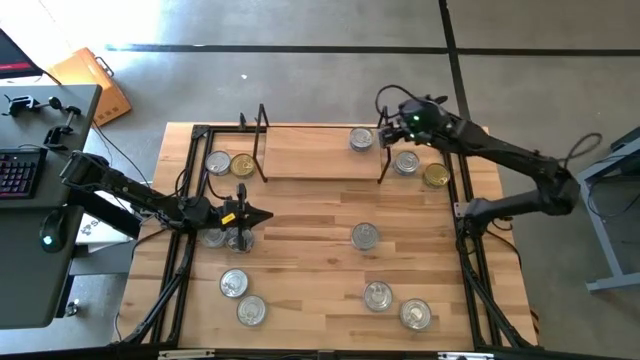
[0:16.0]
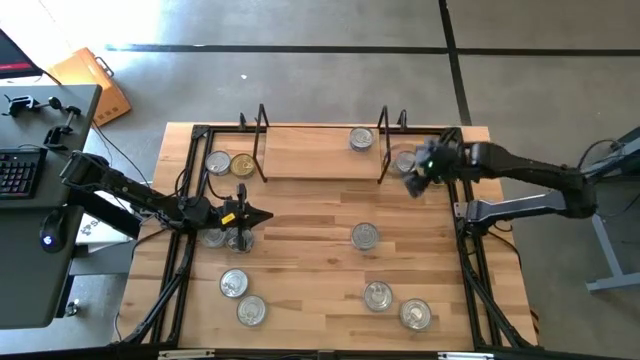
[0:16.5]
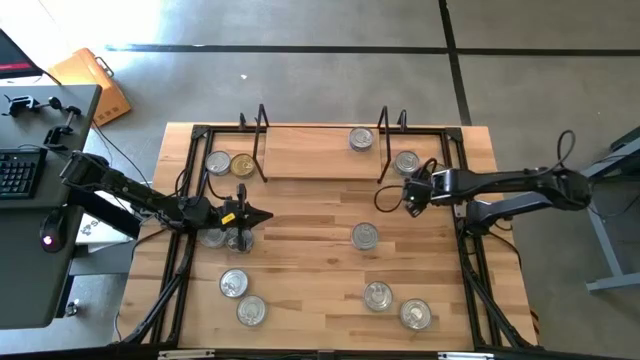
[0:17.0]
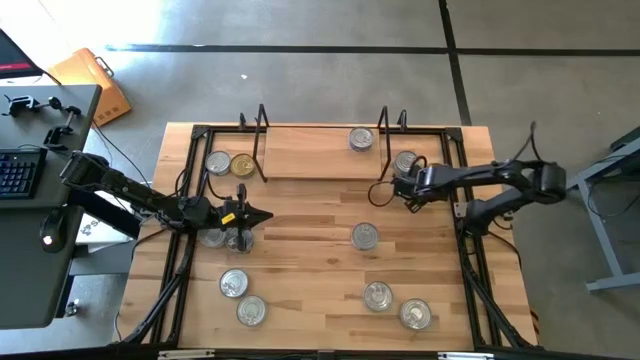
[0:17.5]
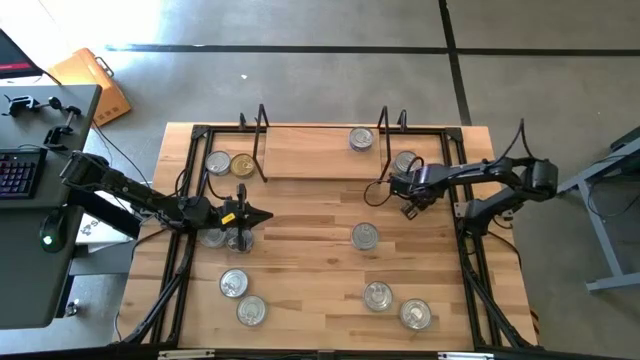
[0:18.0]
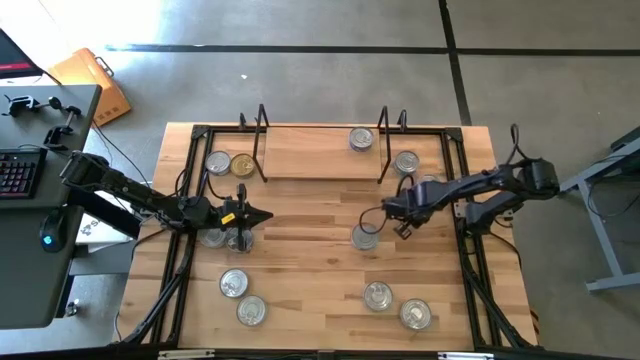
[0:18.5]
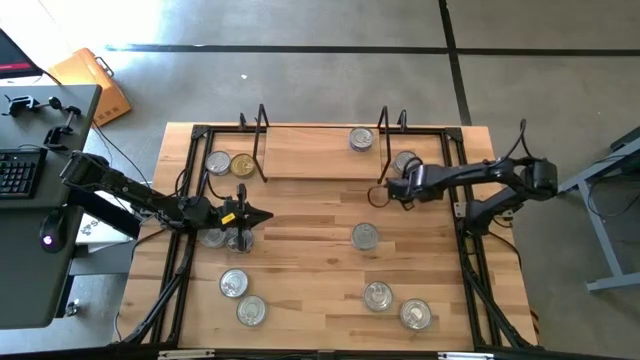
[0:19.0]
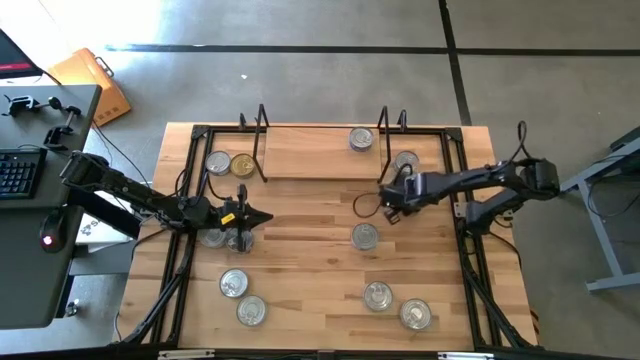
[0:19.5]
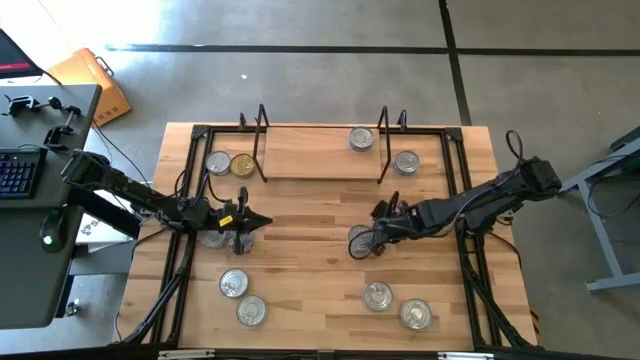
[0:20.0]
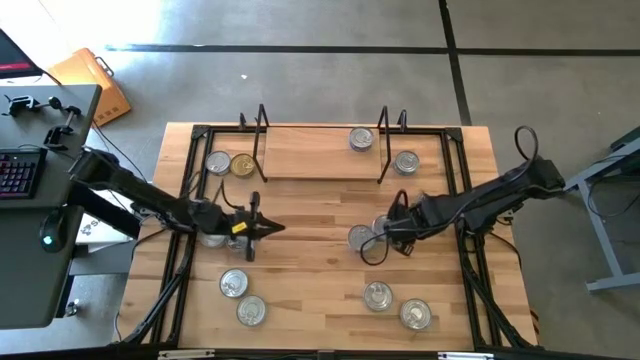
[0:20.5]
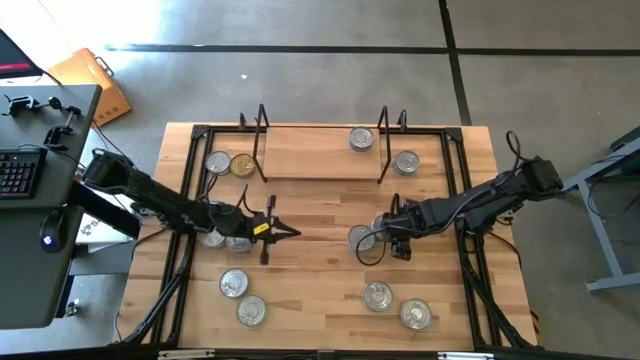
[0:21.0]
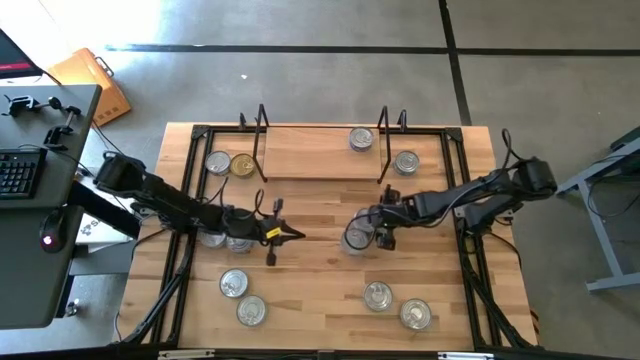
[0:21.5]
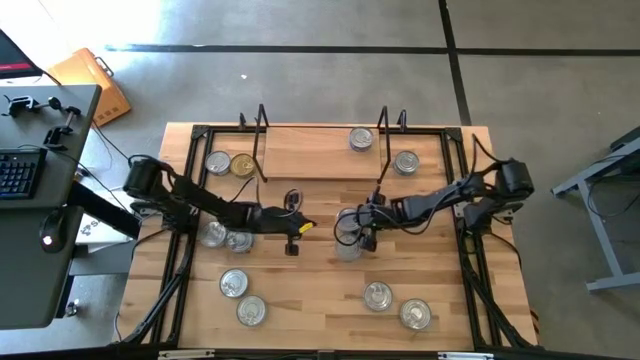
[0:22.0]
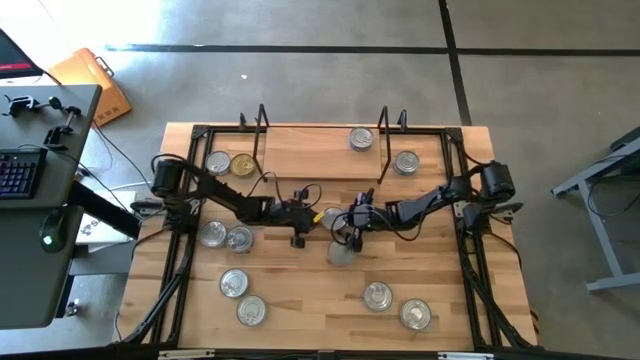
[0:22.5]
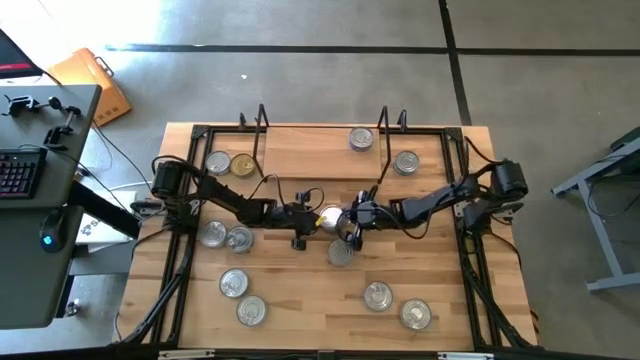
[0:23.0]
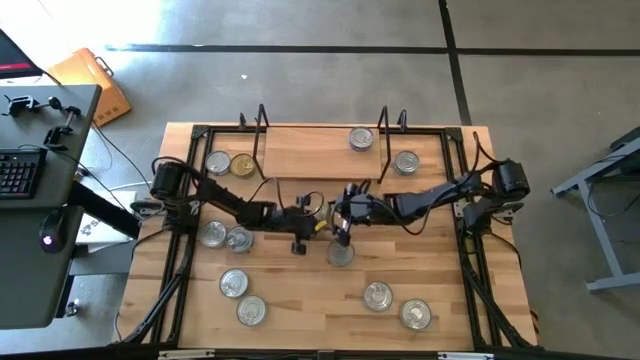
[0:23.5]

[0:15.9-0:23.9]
Task: Stack canned seafood by type on shelf
Put the green tuna can on the shelf

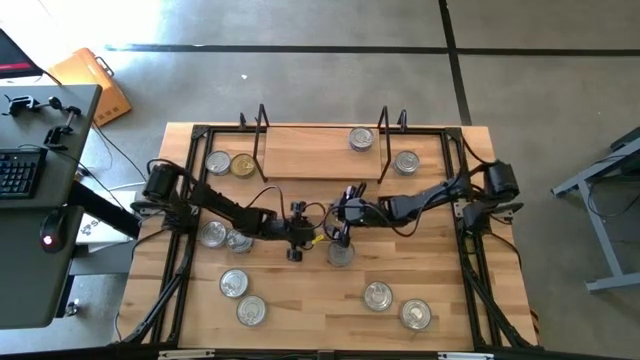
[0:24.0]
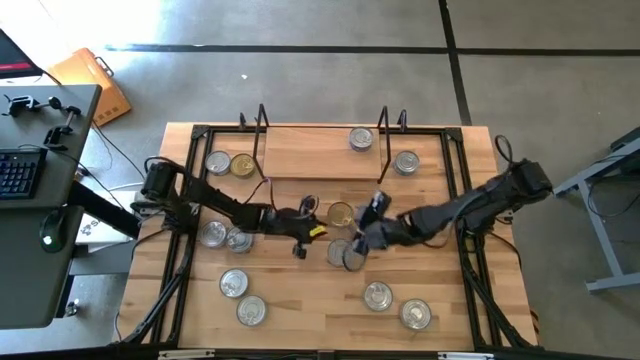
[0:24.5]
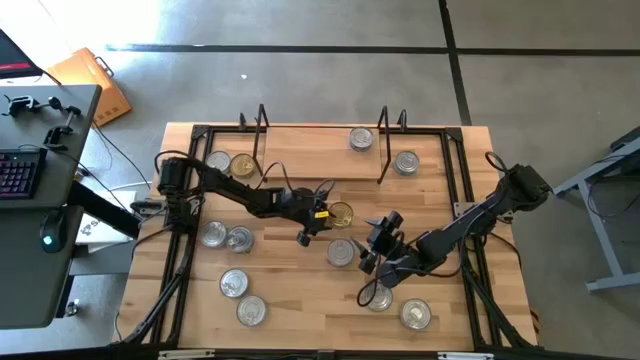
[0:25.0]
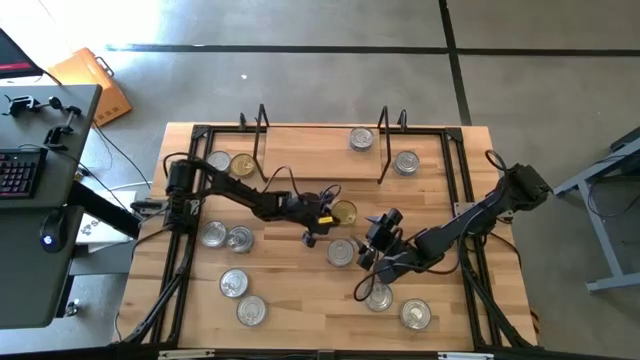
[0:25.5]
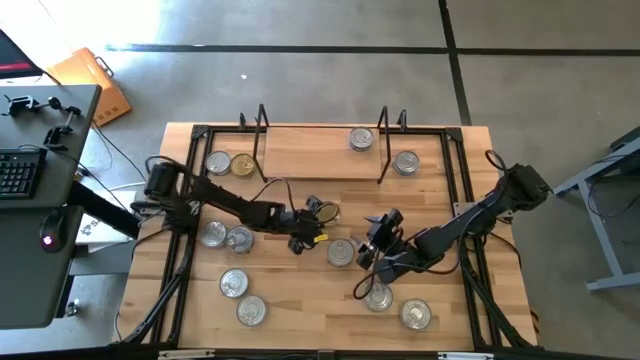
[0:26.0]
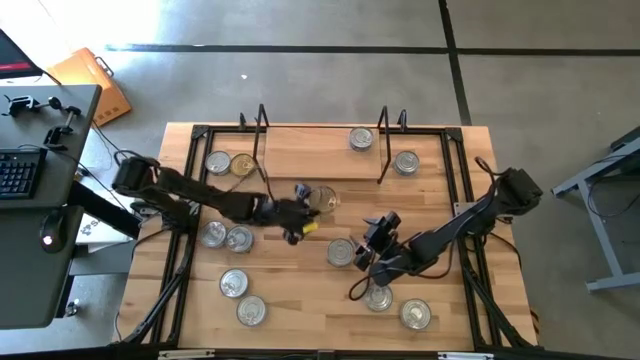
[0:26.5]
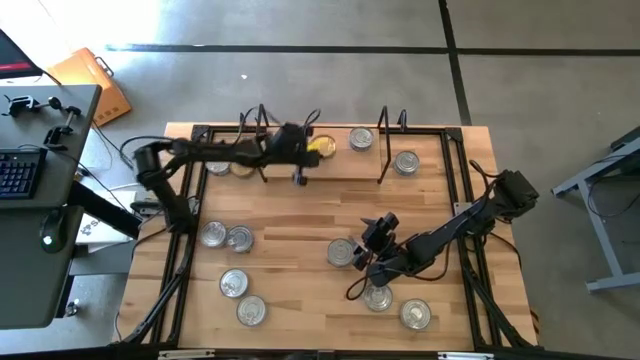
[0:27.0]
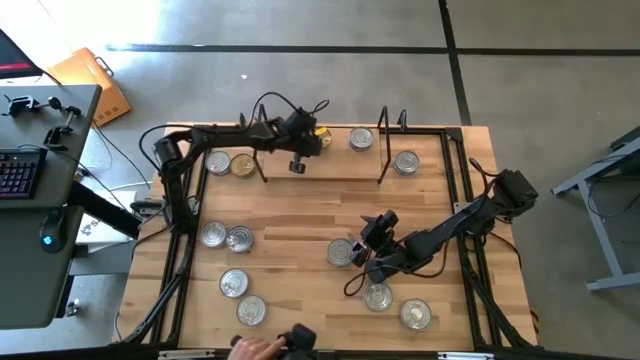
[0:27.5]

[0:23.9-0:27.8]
Put the green tuna can on the shelf

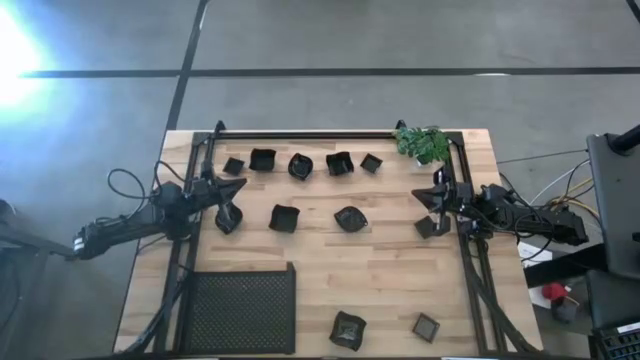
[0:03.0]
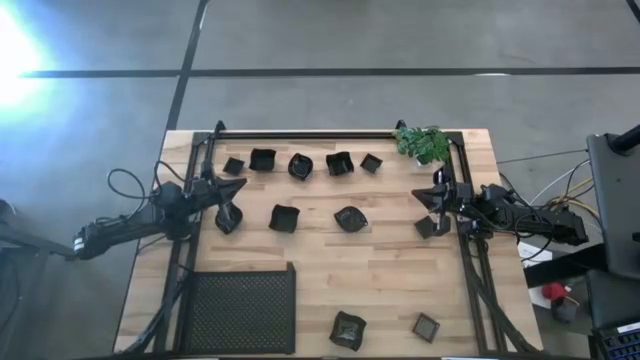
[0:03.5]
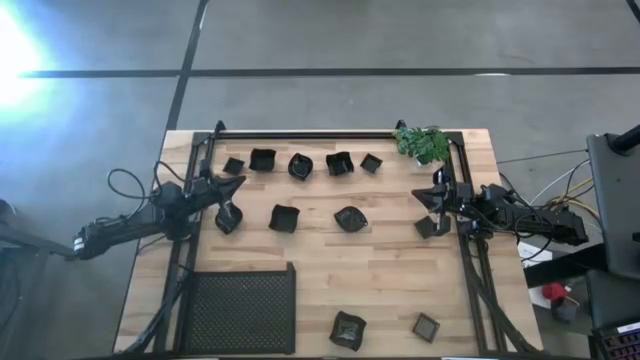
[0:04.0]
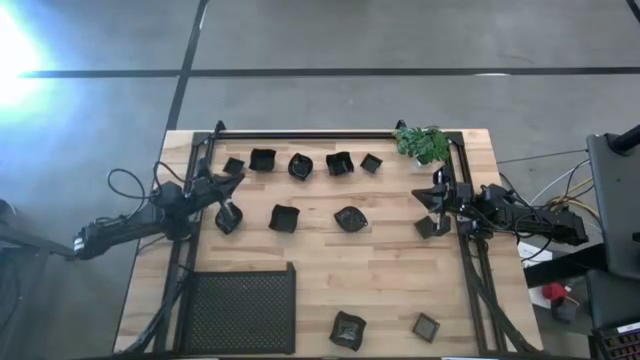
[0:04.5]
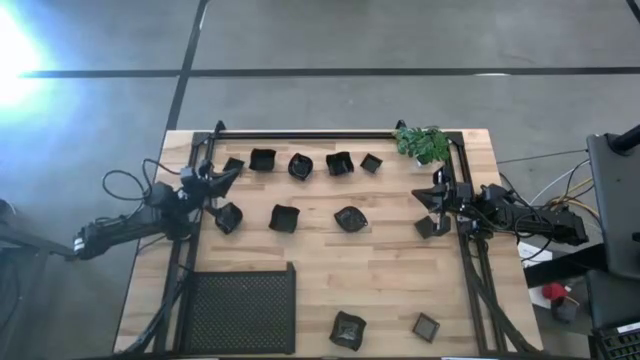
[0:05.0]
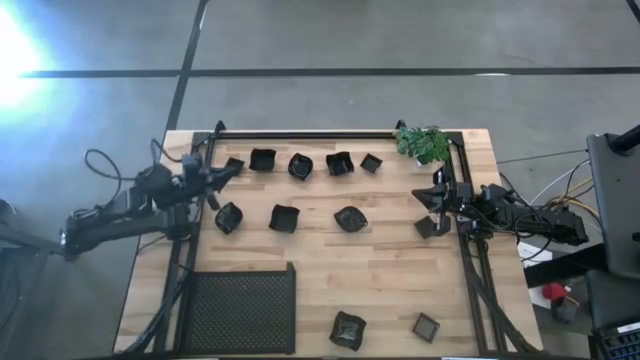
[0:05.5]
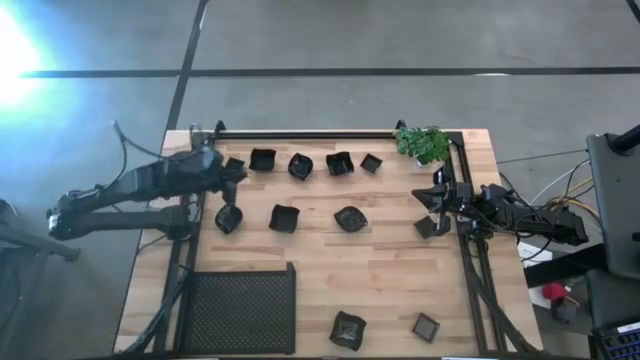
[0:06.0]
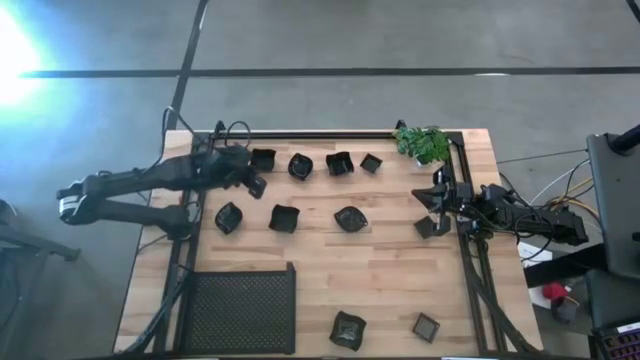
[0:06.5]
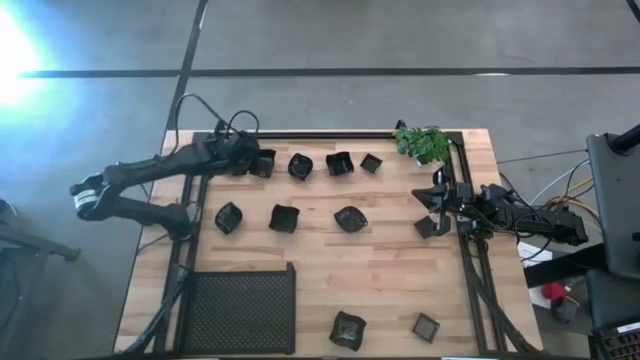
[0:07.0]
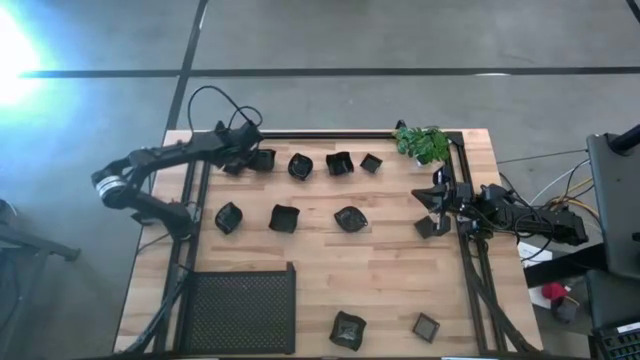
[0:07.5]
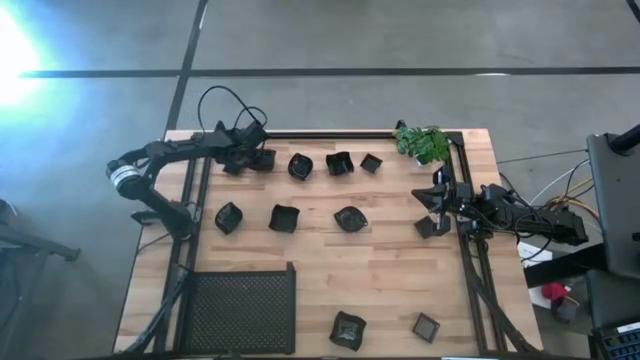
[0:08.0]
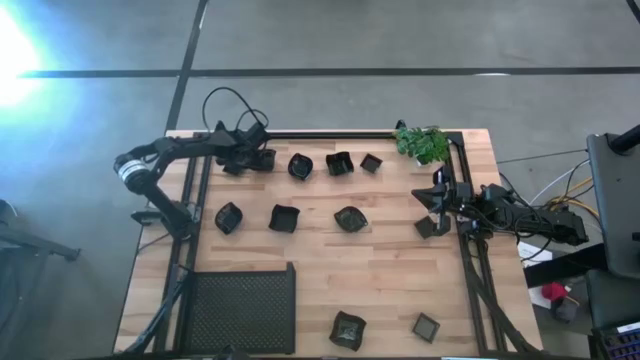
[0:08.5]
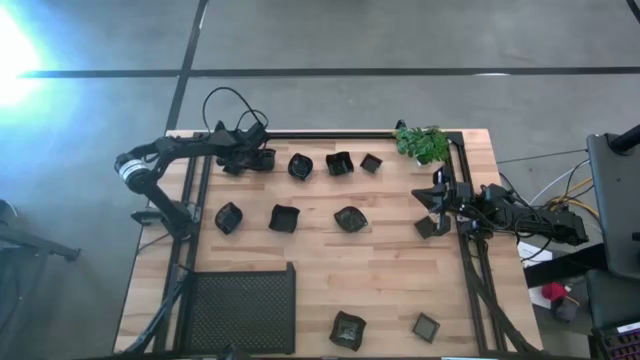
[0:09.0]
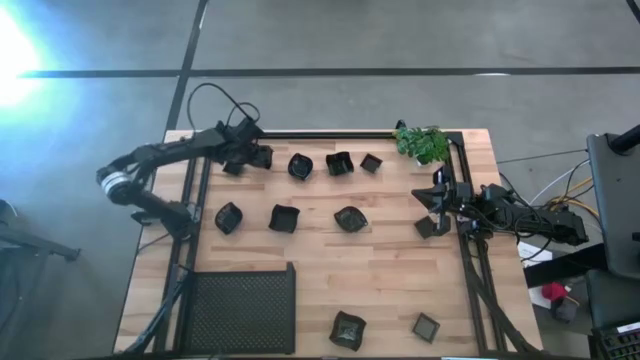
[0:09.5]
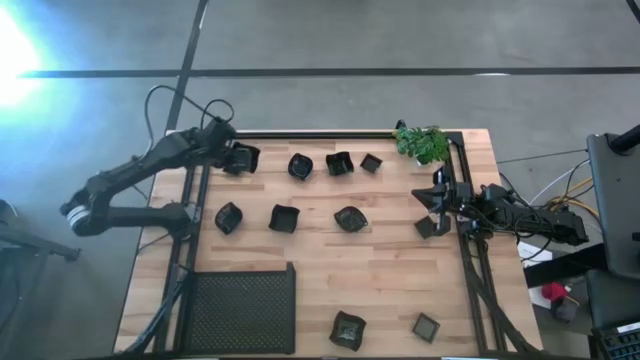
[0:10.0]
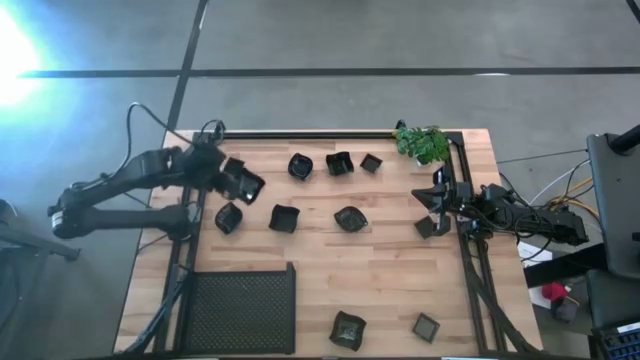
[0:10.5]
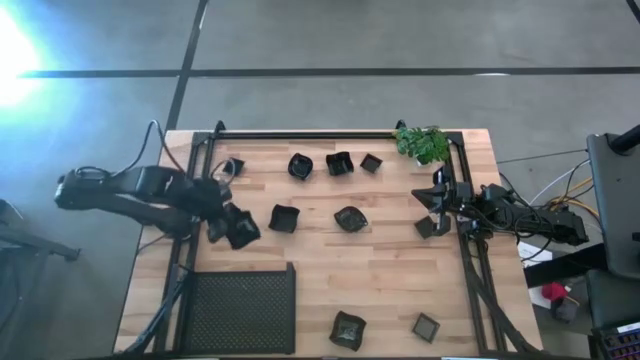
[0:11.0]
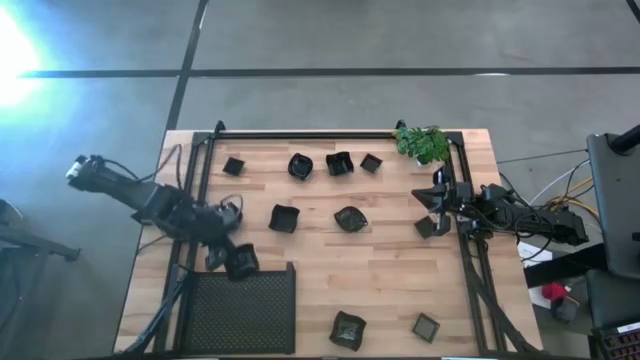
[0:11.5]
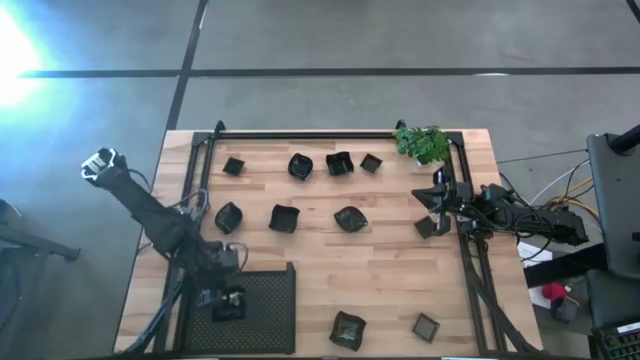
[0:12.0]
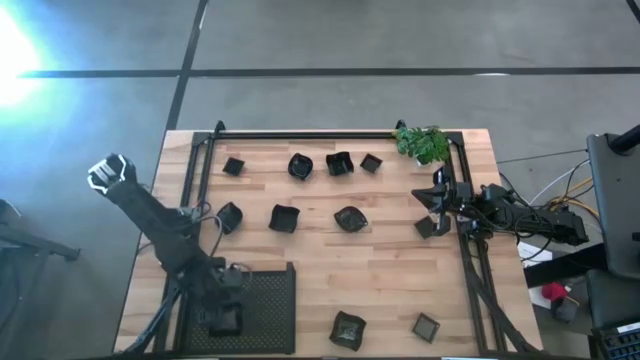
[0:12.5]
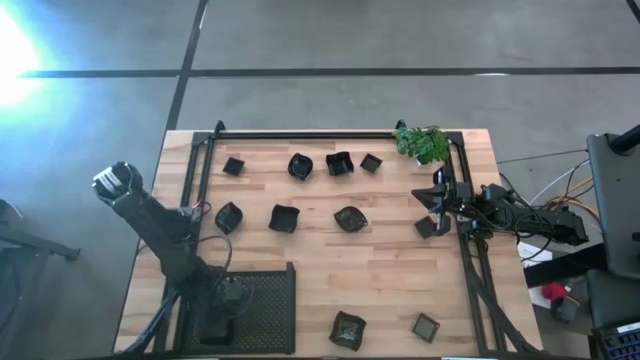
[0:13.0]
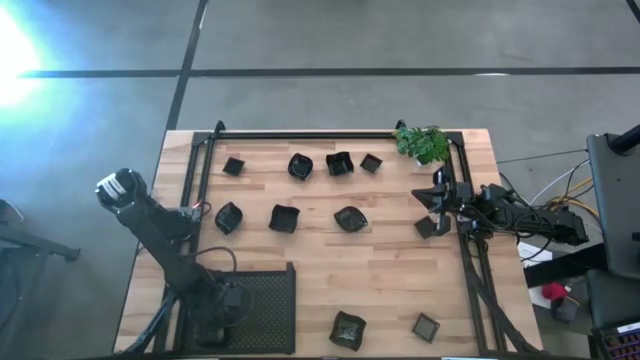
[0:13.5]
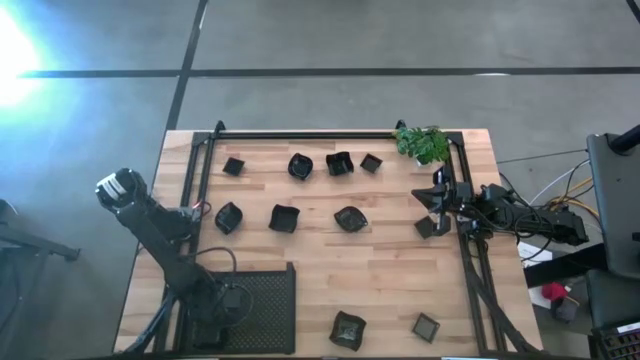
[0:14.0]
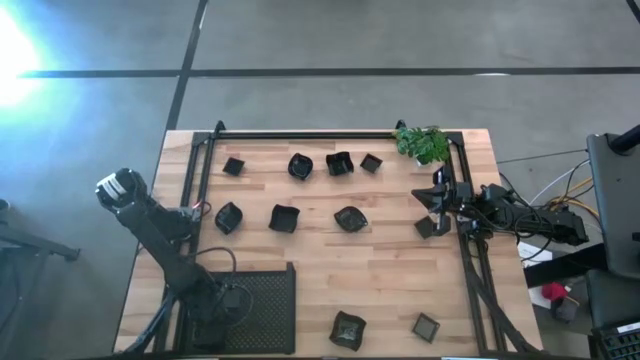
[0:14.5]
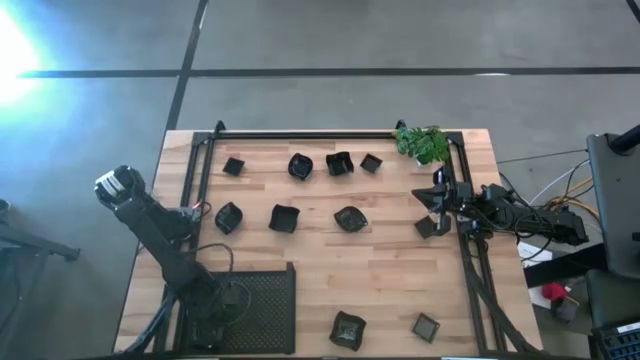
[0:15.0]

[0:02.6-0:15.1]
Task: Pick & Place Mini shaped plates
Put the black distorted square plate on the shelf
